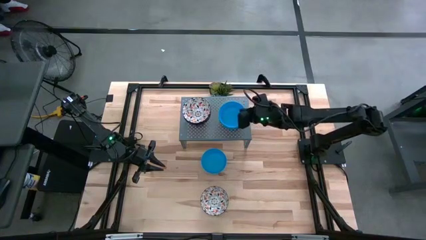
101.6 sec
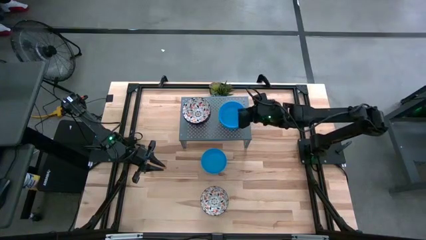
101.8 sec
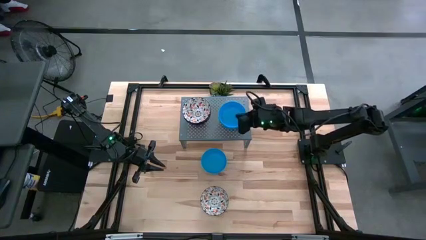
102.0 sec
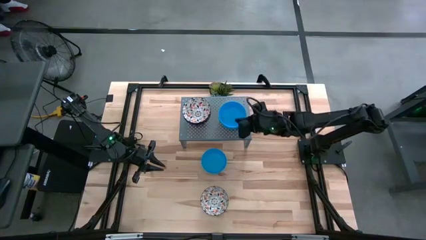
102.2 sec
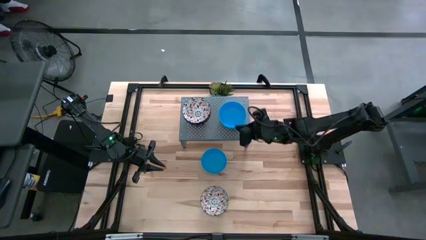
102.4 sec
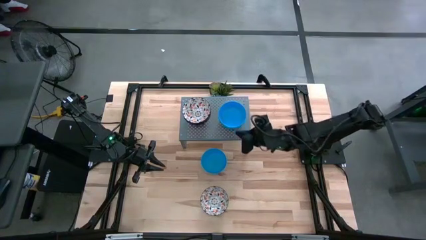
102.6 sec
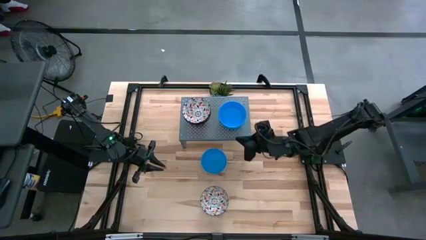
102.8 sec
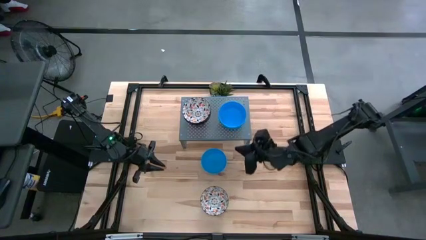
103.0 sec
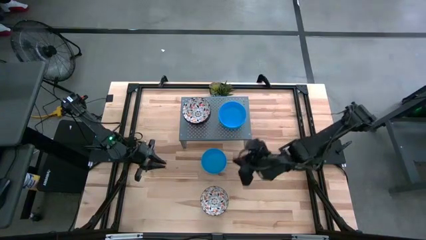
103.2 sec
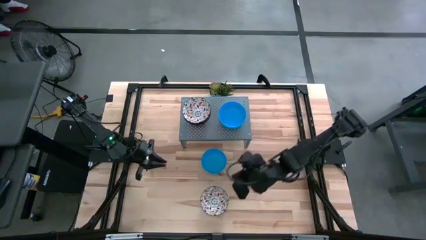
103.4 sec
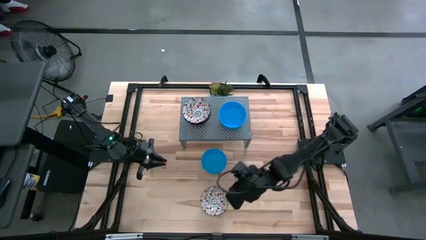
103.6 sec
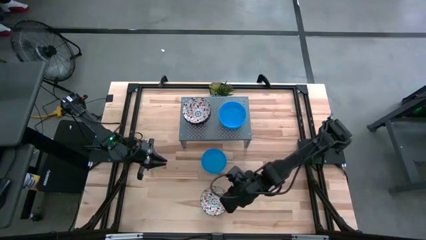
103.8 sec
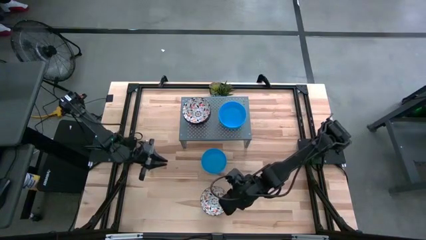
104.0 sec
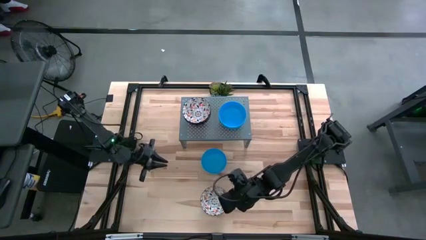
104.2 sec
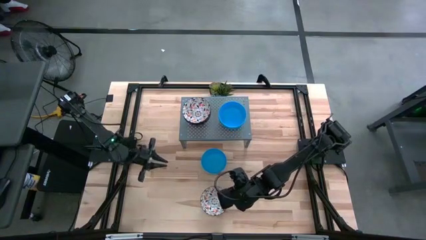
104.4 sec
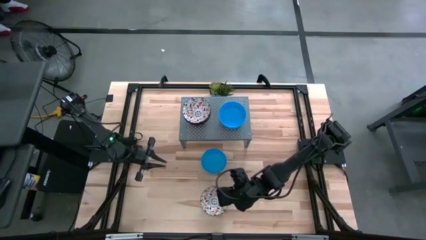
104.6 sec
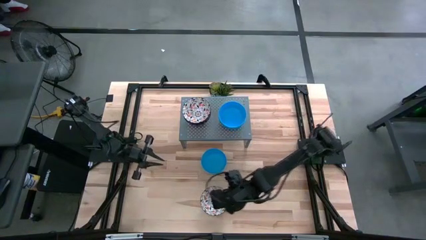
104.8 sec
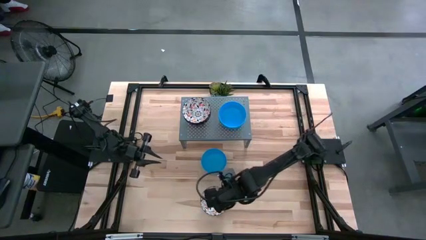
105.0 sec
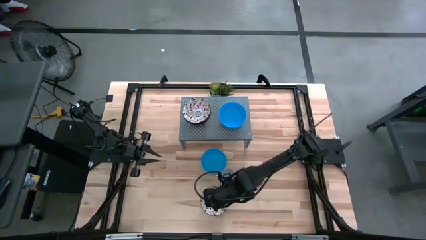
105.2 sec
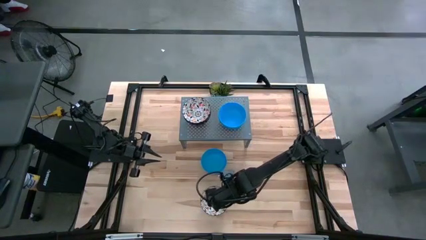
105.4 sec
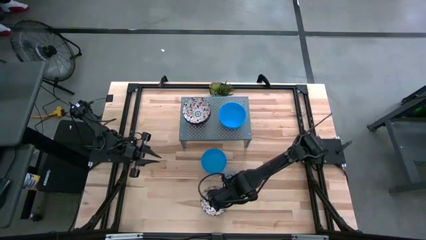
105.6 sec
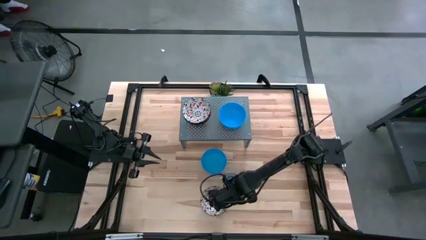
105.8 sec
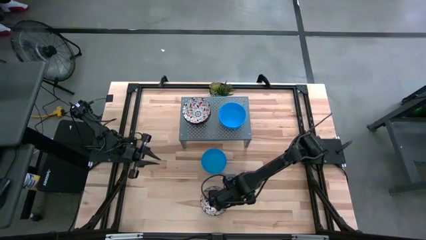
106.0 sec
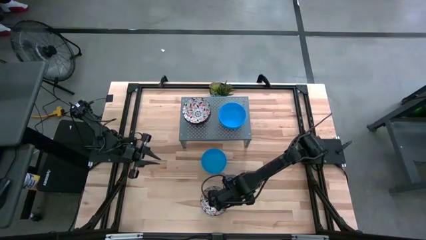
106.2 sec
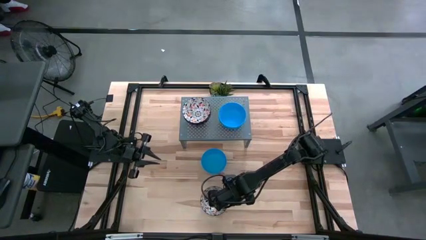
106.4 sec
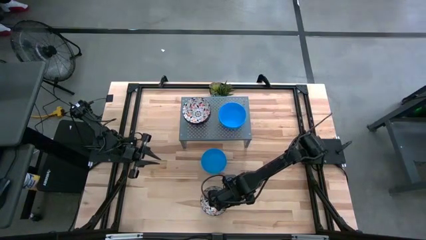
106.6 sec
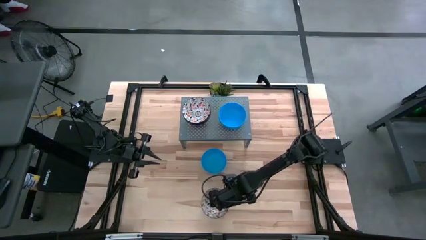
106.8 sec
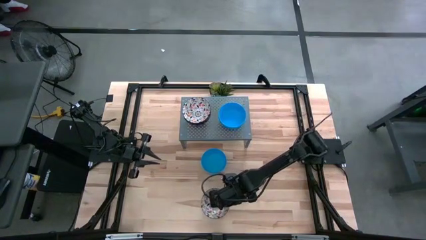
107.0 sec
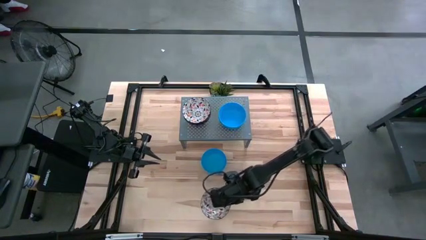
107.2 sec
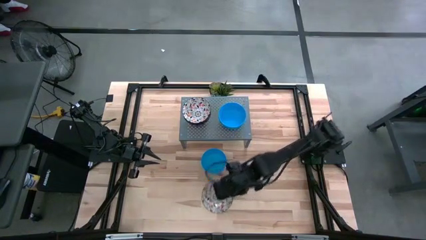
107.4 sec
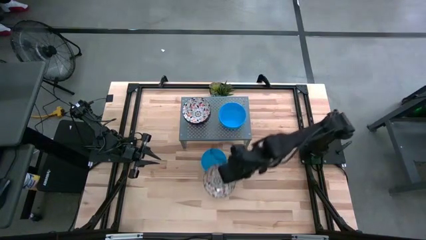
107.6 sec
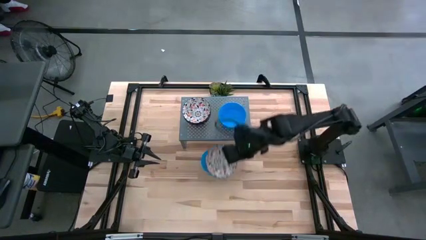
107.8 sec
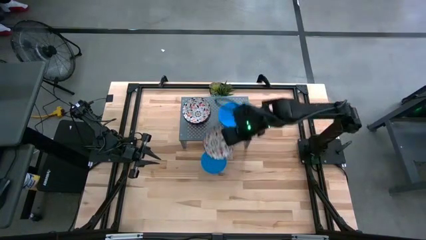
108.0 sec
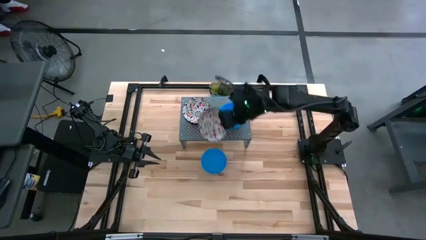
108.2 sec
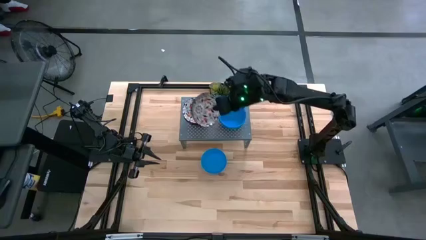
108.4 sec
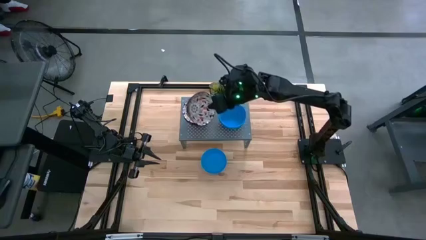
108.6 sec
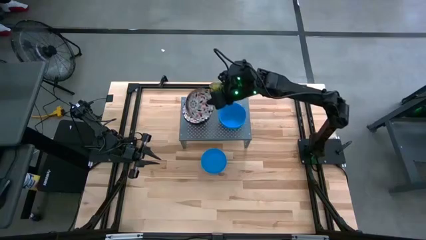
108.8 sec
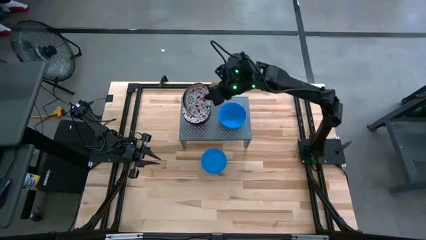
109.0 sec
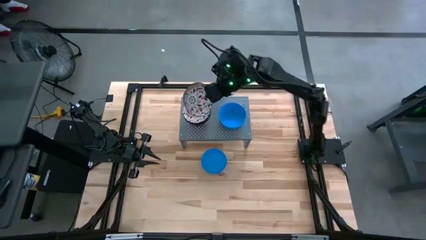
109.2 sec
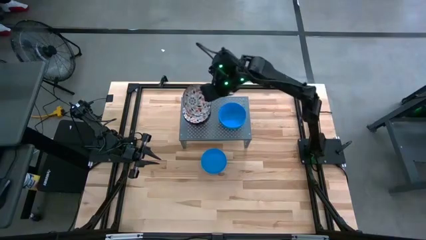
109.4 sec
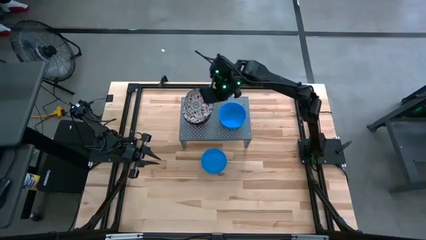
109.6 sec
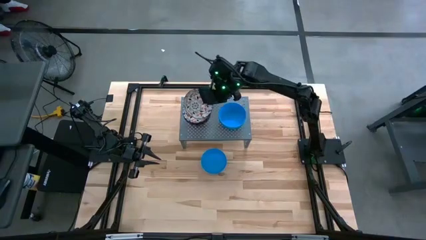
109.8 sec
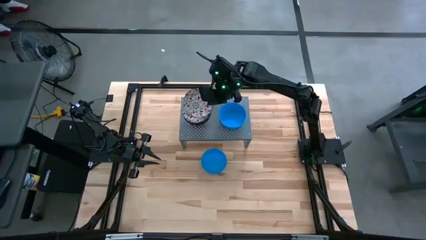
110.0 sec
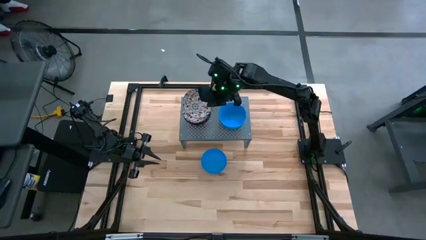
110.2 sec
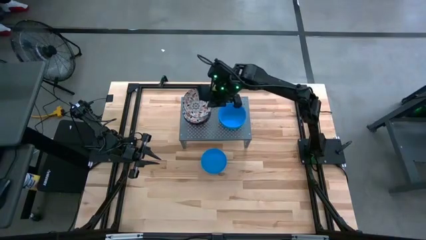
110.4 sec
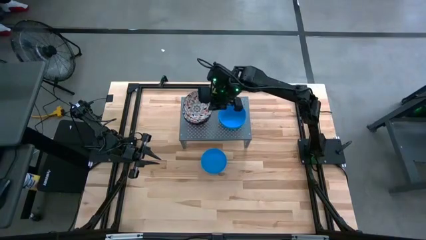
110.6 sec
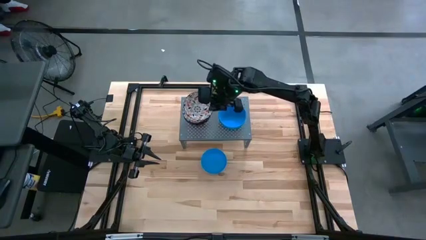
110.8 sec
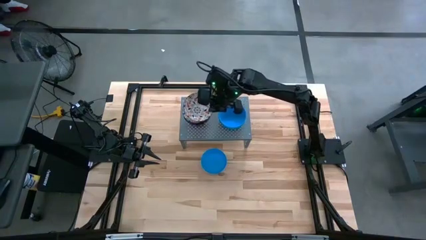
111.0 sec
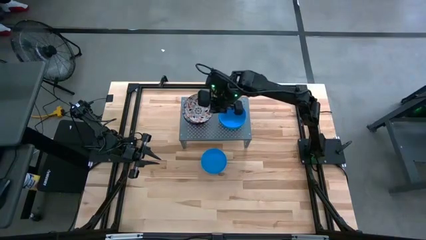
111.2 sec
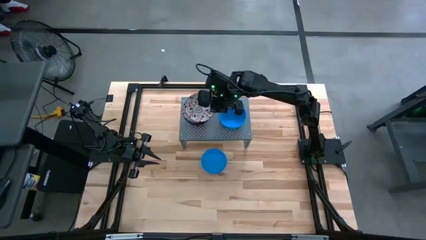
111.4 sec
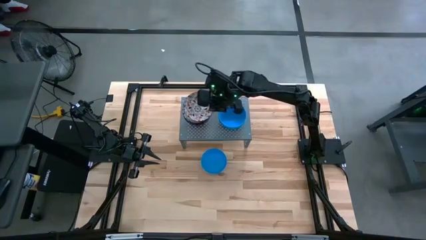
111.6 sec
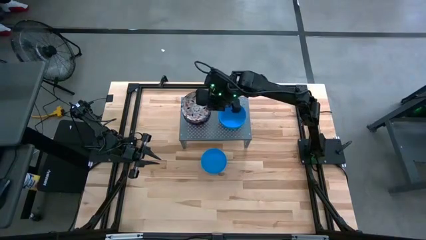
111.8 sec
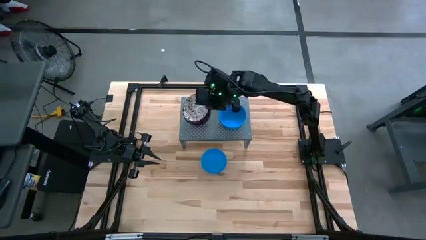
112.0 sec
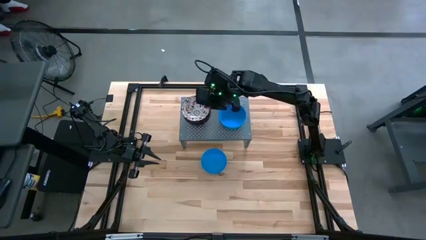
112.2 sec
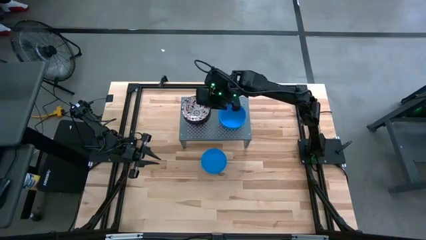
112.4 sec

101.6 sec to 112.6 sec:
Task: Pick & Place Mini bowls
Stack the white patterned bowl on the stacked white patterned bowls on the shelf

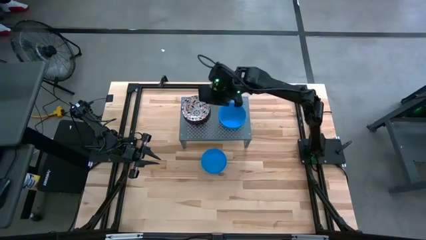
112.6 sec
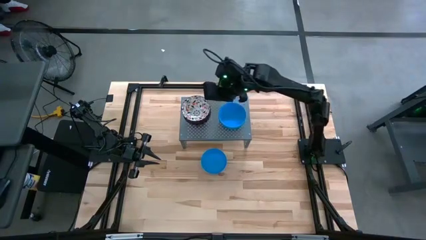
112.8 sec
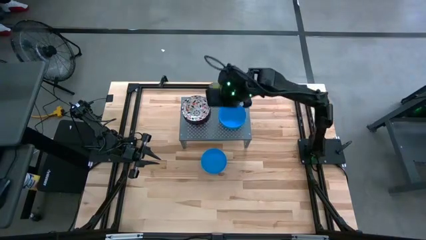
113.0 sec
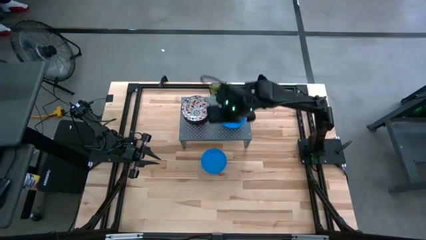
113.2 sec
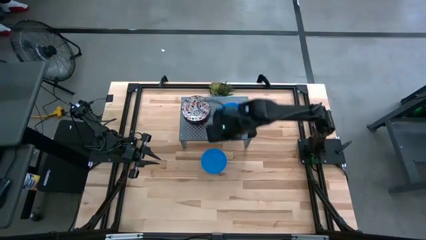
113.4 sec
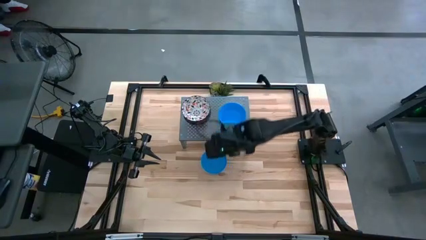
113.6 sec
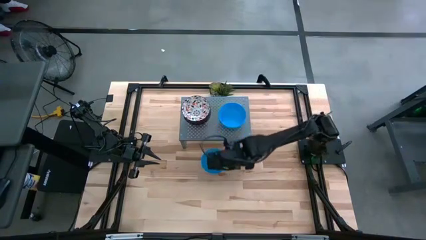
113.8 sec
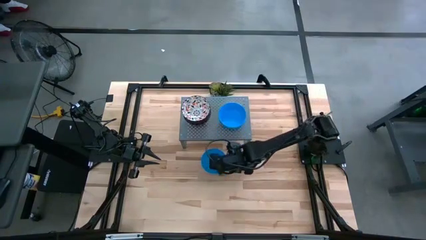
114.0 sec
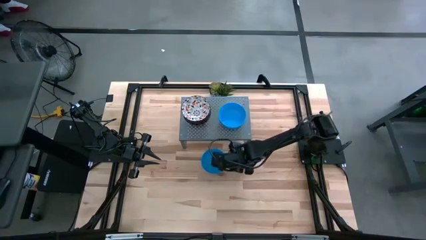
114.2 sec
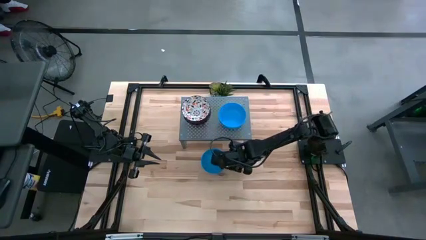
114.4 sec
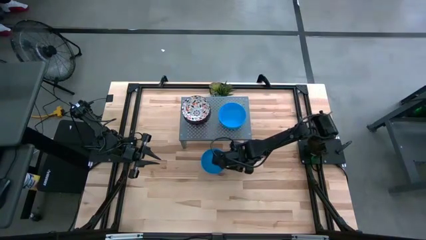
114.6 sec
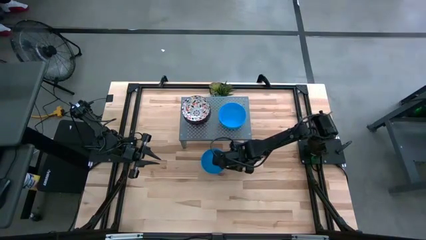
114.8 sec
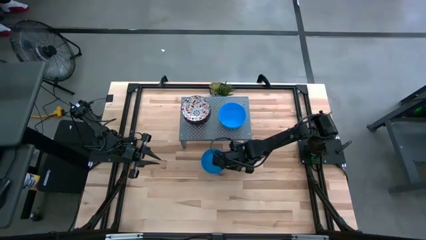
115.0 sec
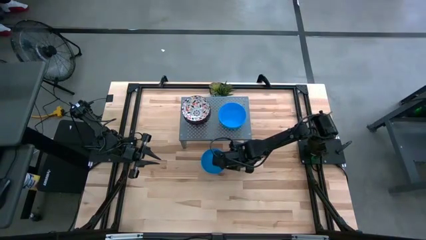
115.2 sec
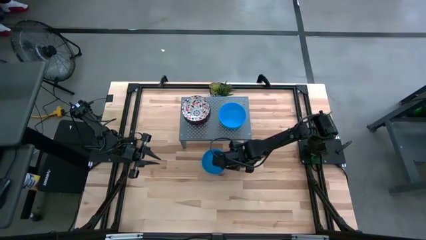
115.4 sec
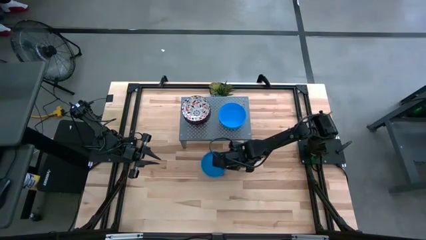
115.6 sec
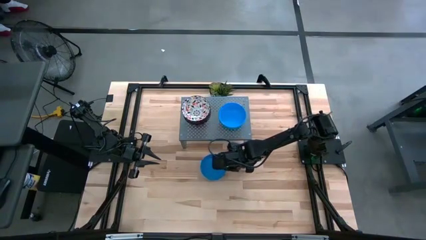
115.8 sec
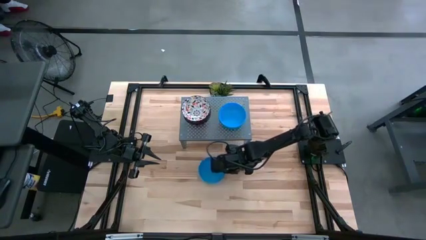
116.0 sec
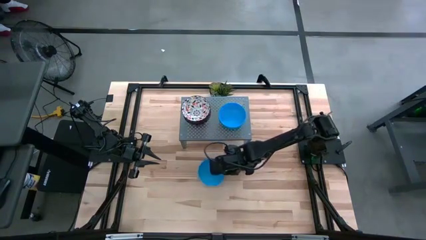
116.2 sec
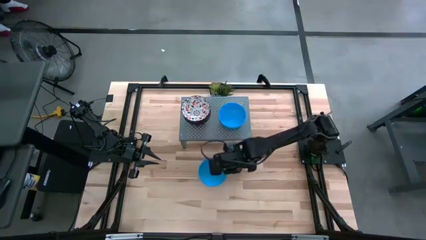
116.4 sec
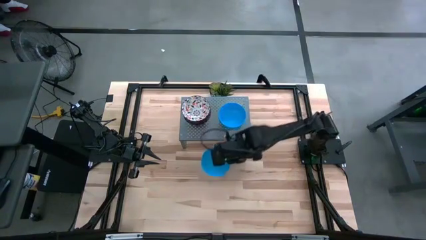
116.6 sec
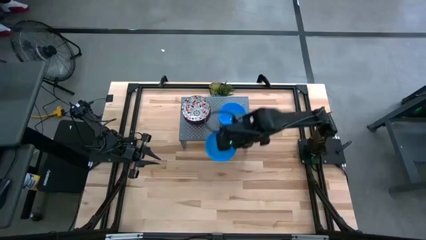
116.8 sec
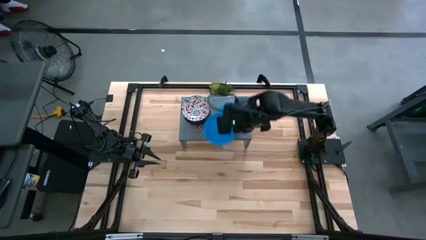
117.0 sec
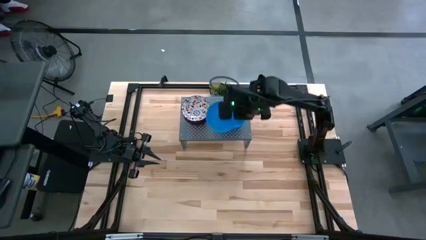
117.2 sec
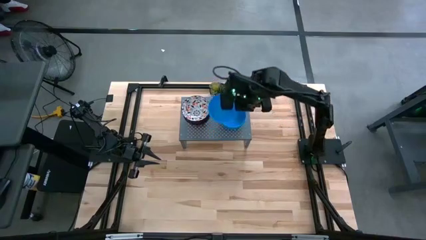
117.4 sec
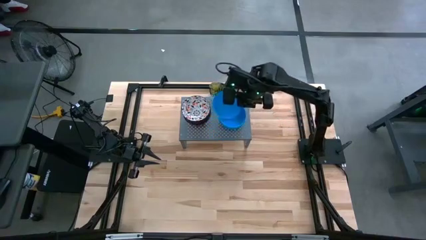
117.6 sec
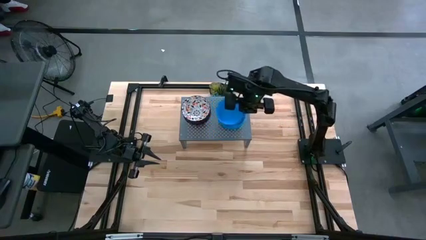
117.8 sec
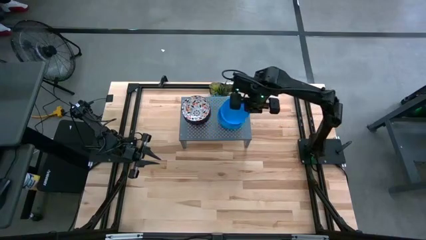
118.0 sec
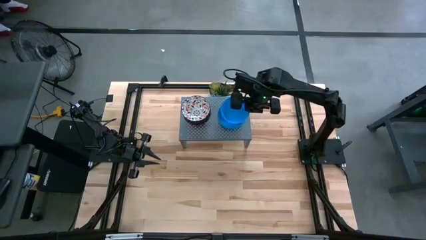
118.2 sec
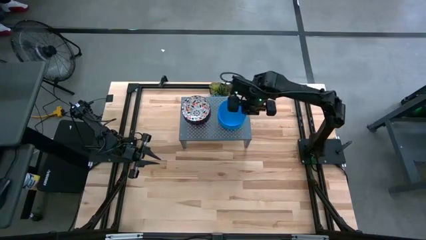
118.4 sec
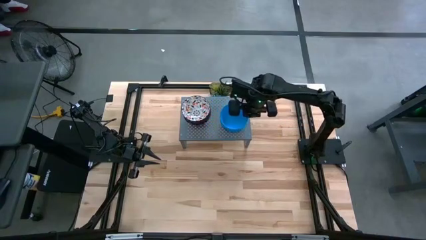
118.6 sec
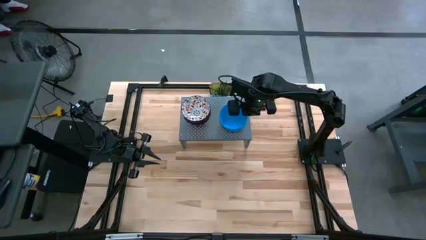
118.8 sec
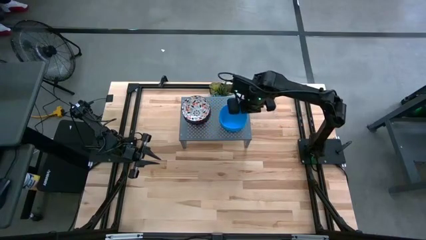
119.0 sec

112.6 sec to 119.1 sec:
Stack the blue bowl on the stacked blue bowls on the shelf
